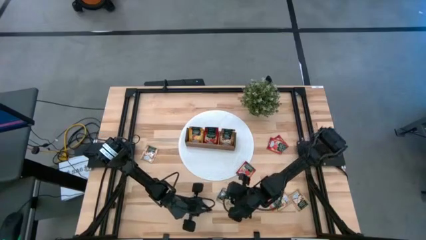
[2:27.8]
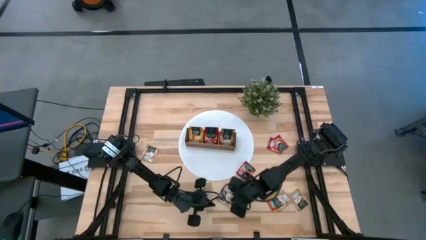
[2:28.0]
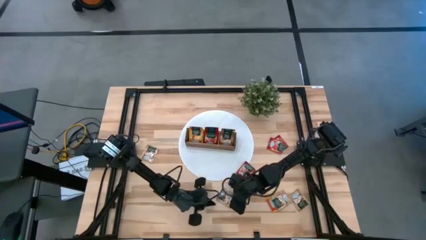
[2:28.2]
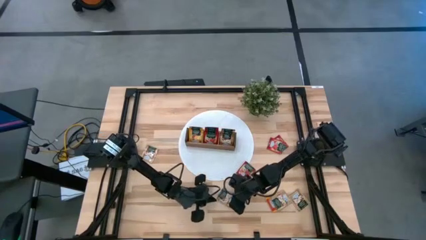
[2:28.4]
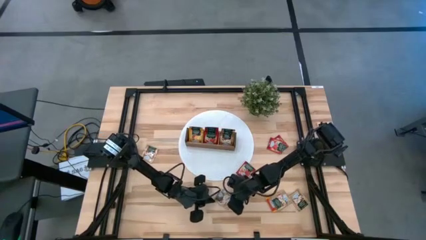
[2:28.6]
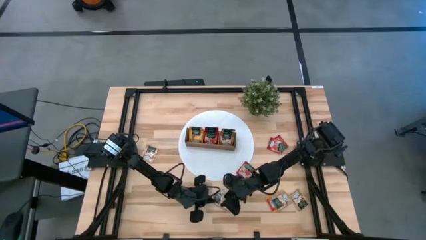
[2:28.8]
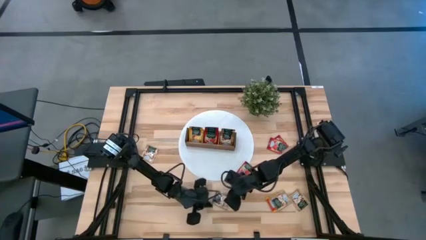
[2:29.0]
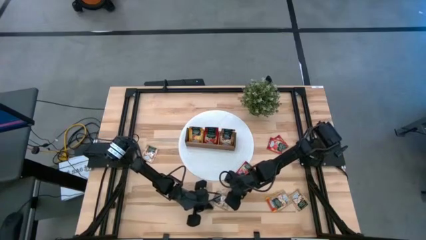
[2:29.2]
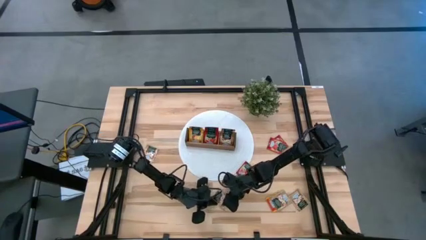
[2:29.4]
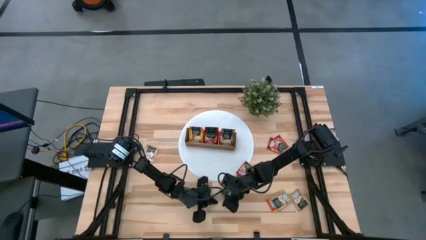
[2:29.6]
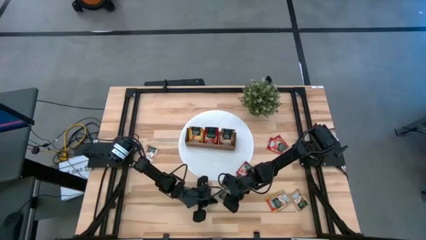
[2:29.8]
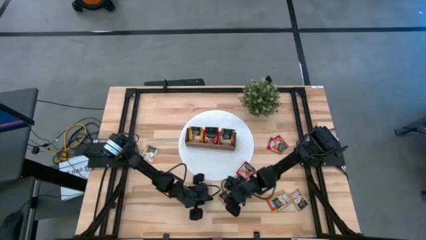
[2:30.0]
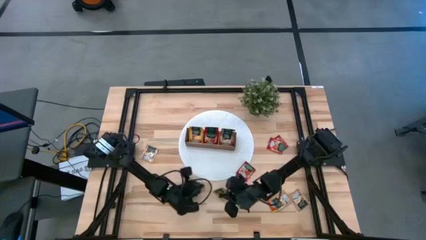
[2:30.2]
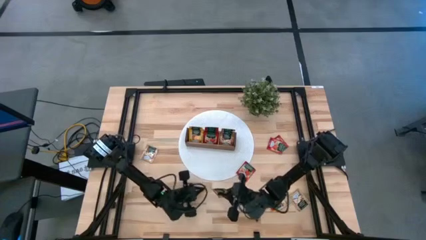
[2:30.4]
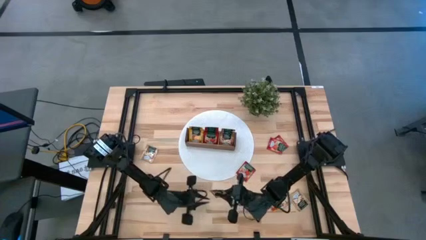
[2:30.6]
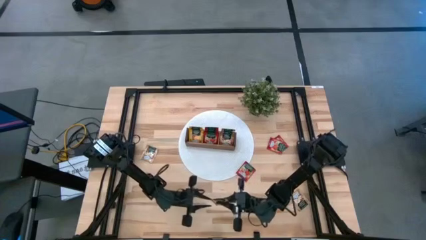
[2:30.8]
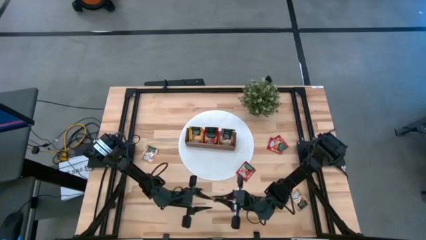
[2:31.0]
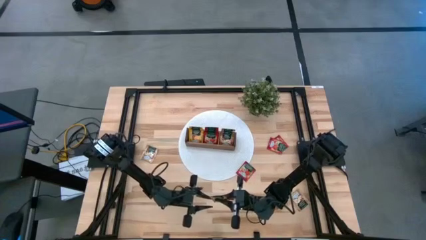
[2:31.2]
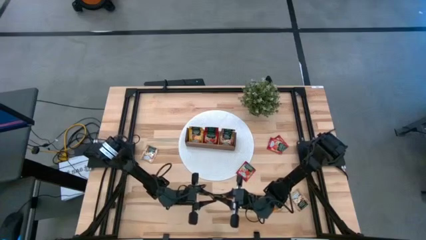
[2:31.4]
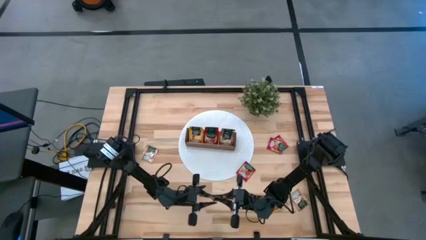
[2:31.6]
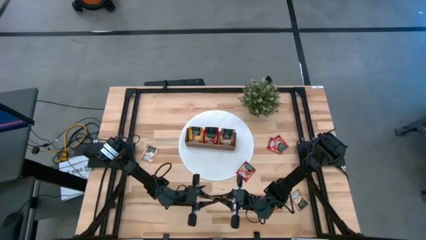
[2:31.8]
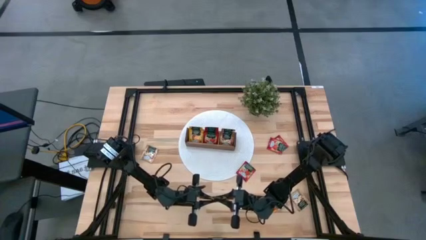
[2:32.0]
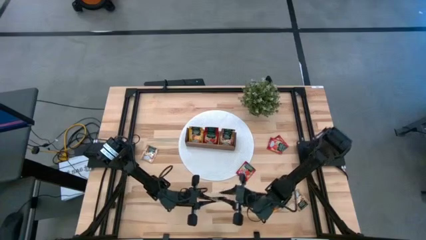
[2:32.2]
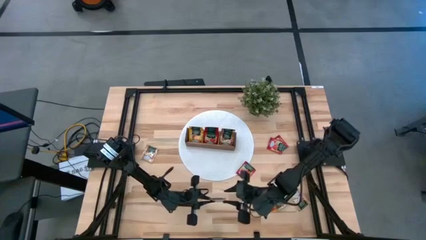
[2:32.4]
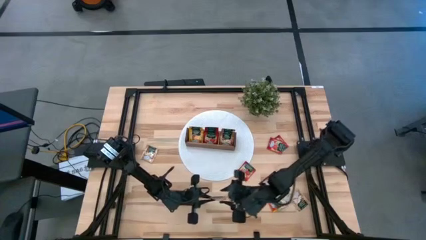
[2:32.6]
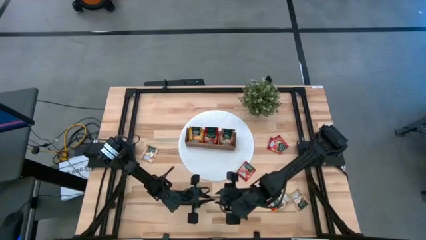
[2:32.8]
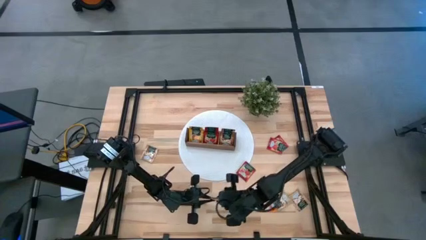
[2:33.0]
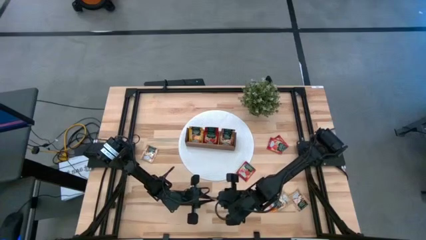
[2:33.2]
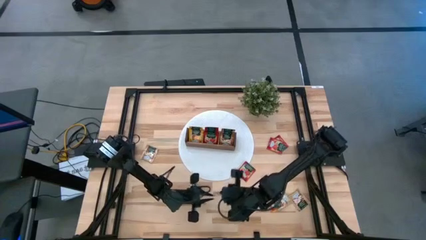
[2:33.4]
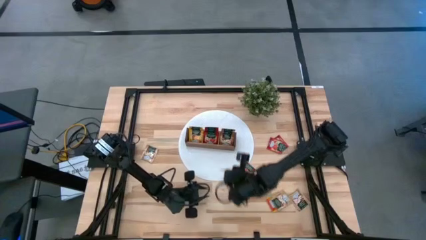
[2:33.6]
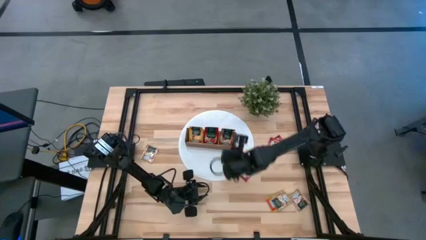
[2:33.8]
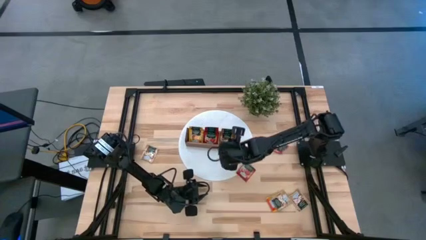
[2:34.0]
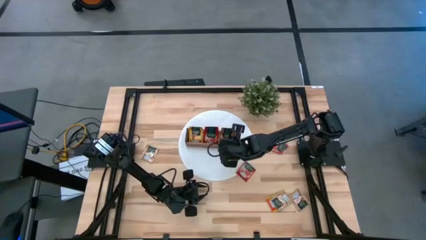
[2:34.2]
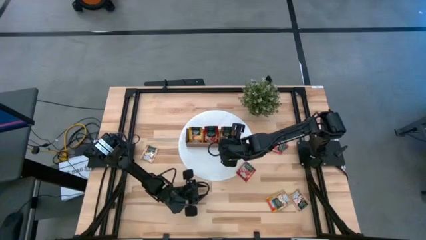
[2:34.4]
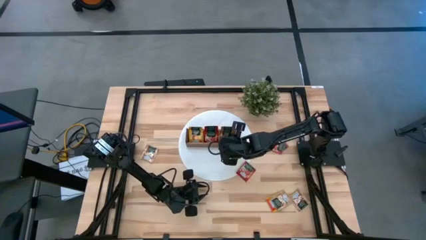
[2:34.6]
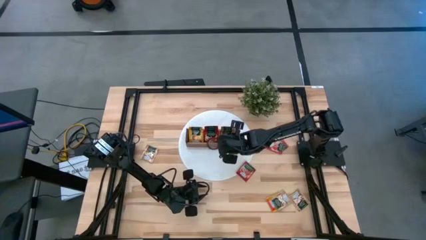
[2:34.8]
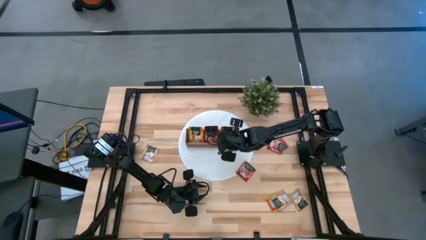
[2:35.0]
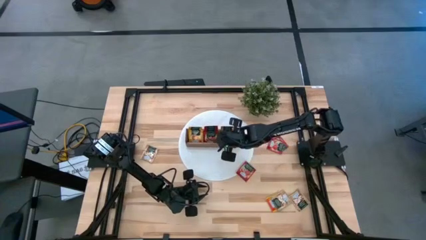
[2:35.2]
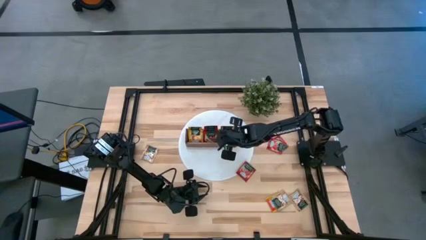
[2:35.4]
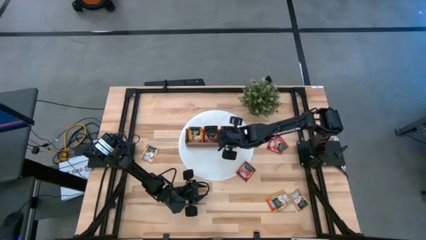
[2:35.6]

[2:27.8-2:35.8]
Task: Pick & Place Tea
Put the brown tea bag into the right section of the wooden organizer

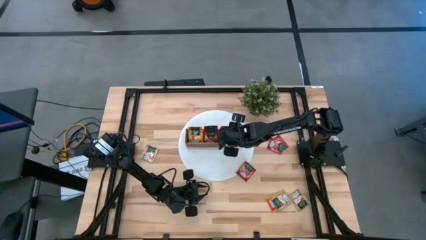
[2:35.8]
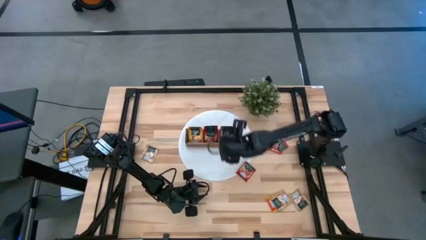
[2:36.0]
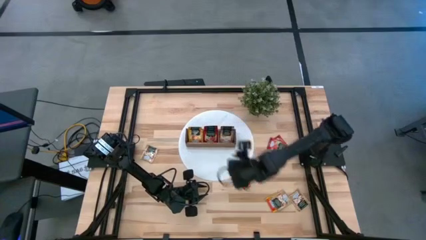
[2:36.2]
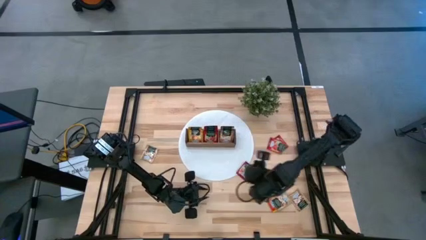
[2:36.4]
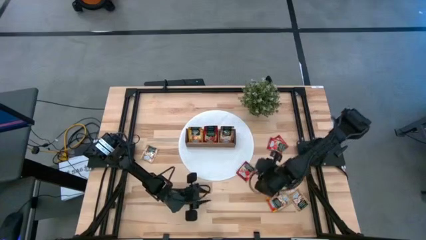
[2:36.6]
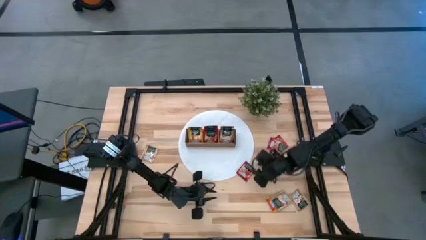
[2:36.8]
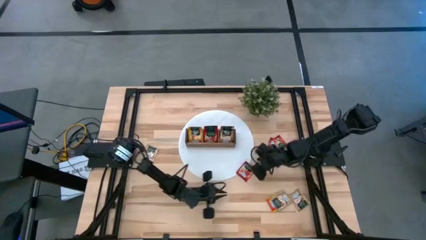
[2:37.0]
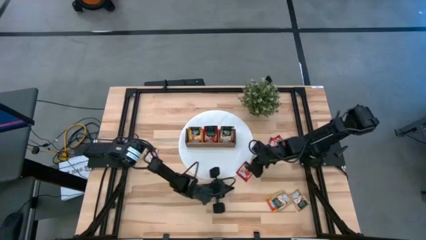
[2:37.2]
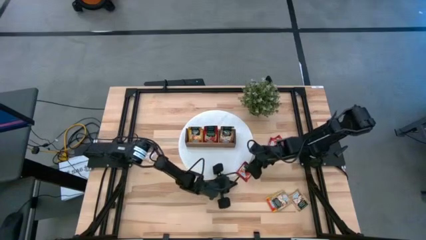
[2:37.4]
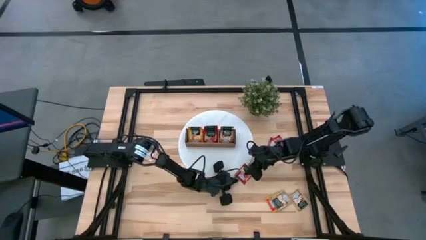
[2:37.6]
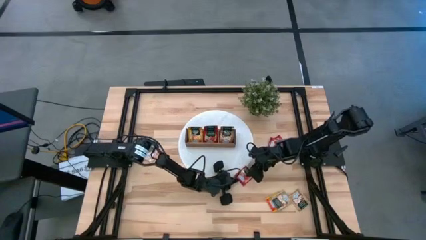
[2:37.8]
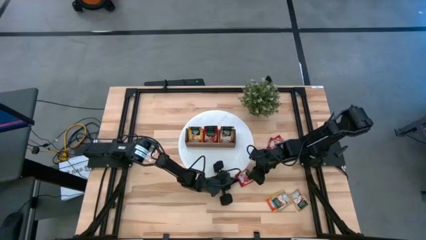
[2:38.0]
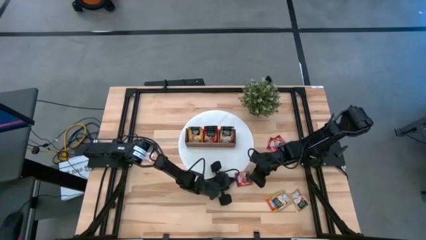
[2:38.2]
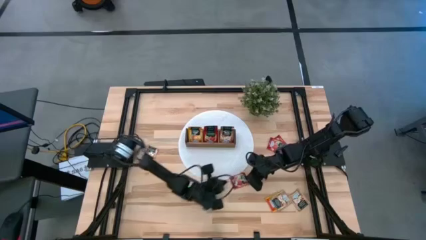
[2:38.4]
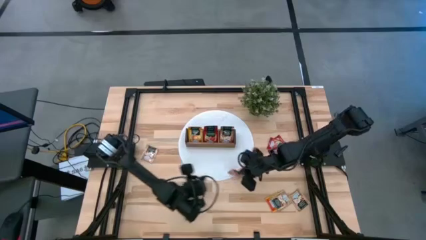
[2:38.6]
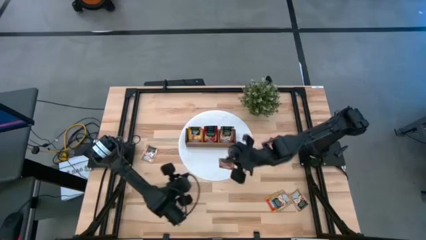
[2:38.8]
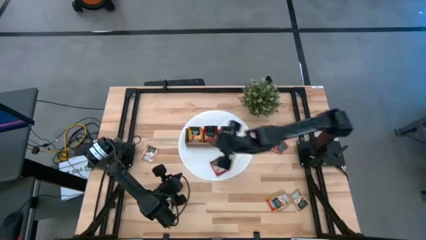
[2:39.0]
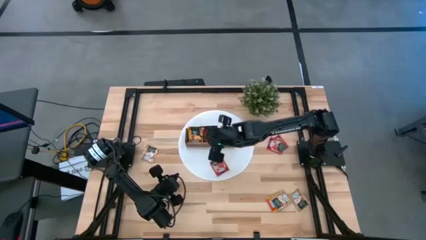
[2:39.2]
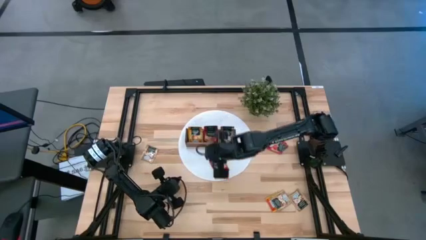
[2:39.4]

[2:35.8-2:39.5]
Put the red tea bag into the middle section of the wooden organizer

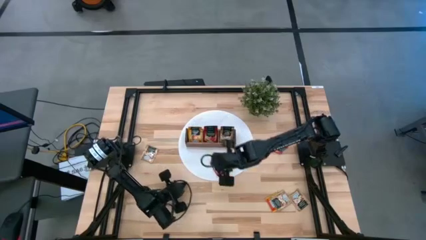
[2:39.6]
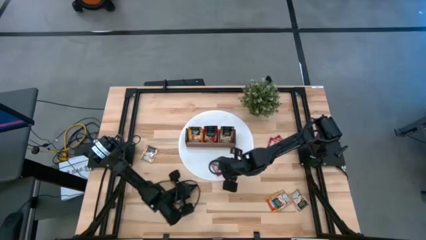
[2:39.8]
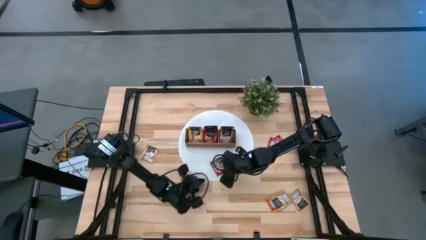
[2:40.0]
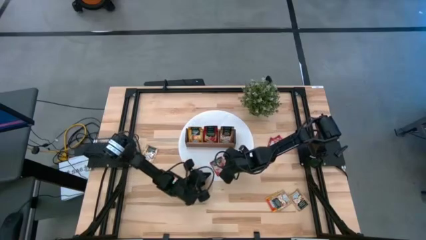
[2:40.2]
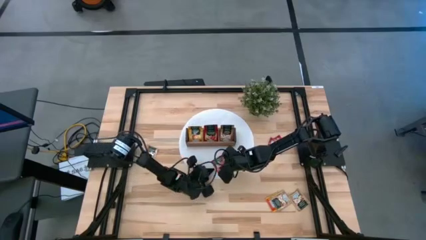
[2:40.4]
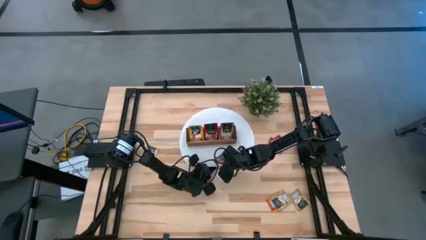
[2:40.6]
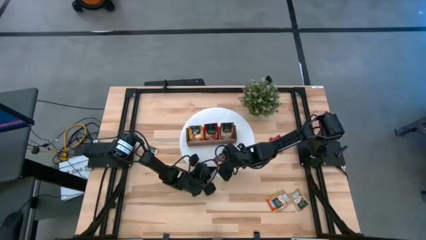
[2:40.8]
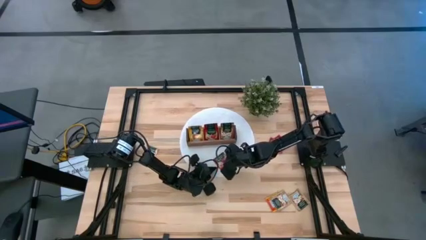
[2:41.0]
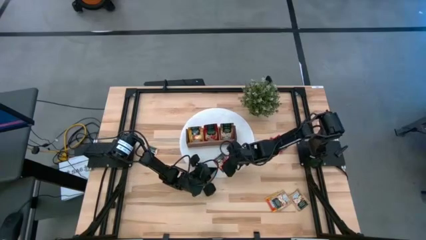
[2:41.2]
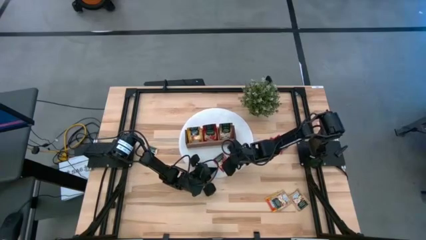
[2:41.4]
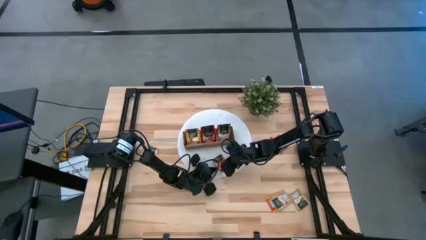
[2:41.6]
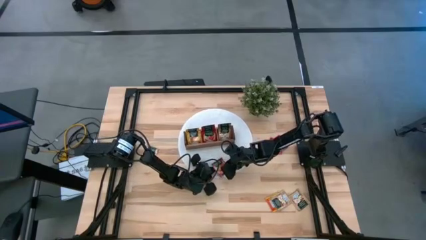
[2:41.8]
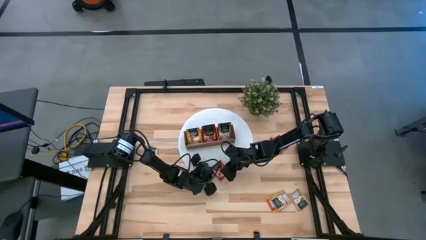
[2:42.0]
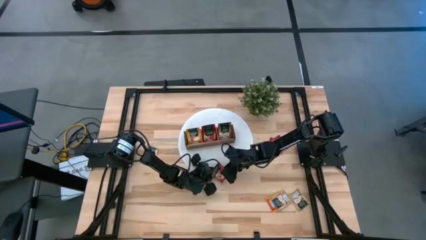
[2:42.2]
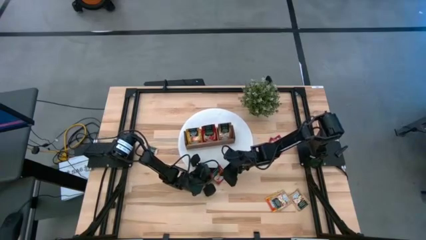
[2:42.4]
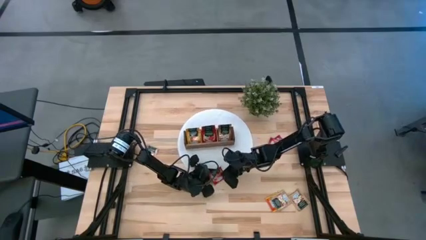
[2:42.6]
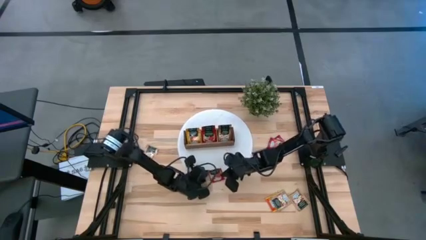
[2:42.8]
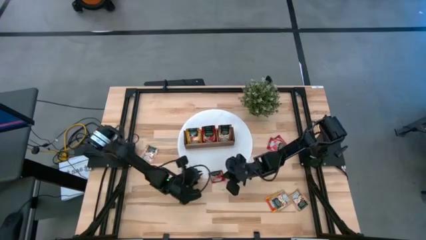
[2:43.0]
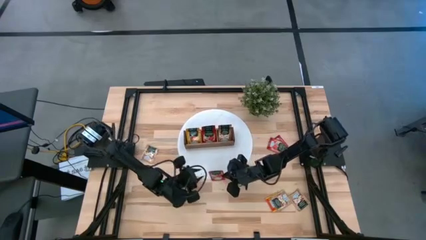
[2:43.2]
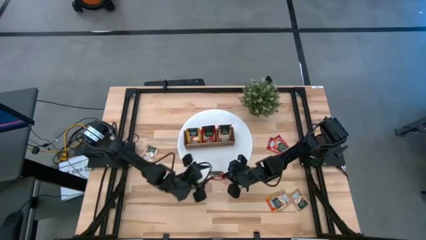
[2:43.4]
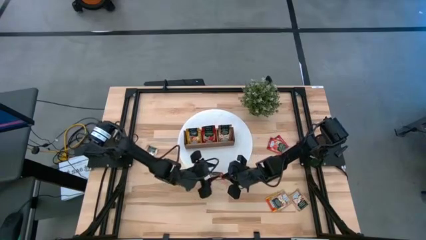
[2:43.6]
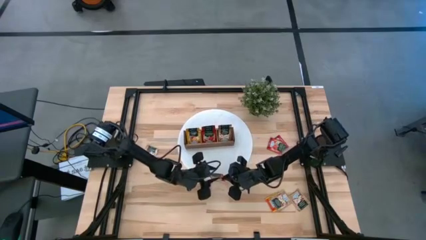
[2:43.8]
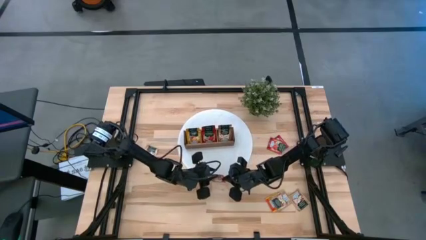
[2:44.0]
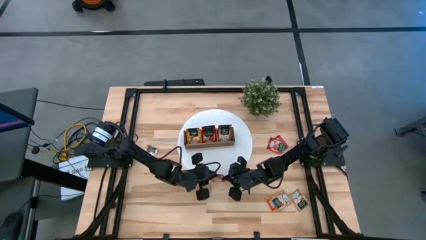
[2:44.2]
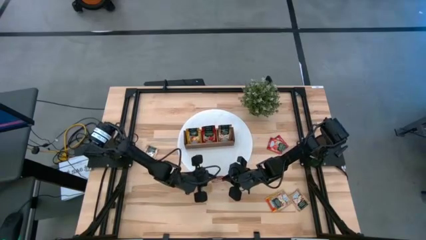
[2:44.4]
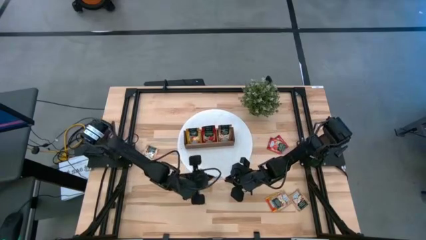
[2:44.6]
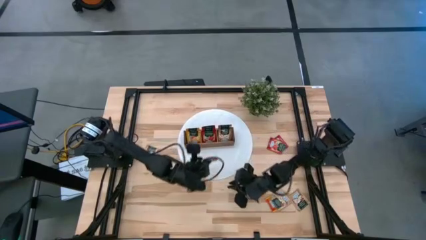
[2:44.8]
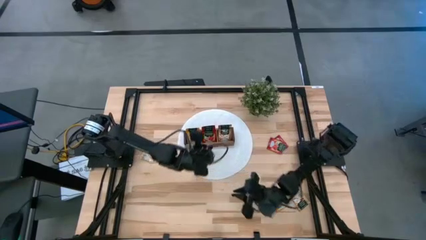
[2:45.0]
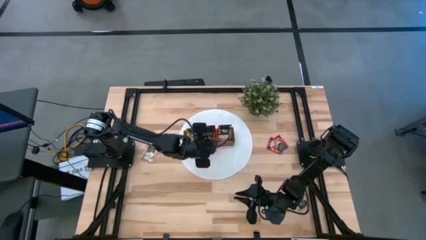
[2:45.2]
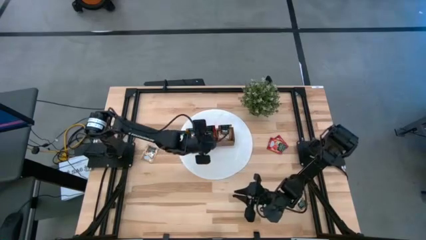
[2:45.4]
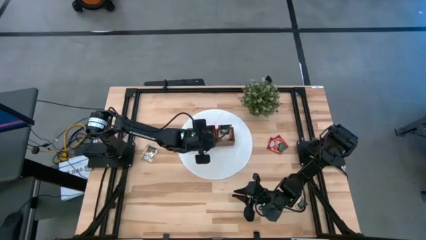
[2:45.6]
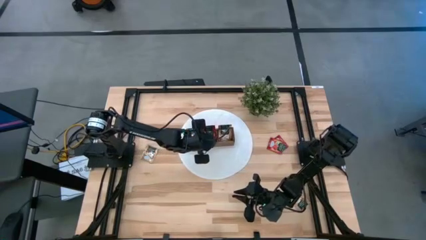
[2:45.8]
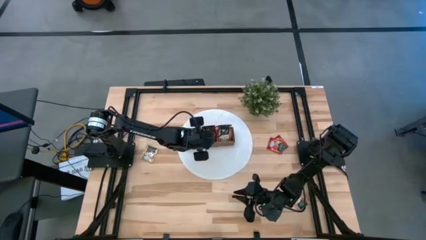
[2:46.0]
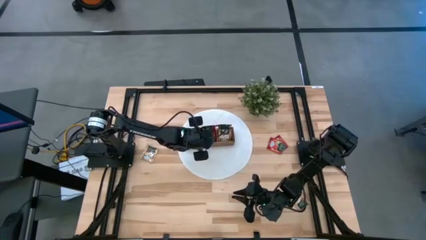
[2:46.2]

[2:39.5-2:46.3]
Put the red tea bag into the middle section of the wooden organizer
